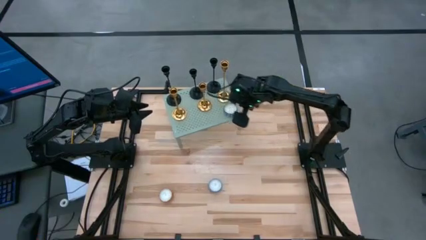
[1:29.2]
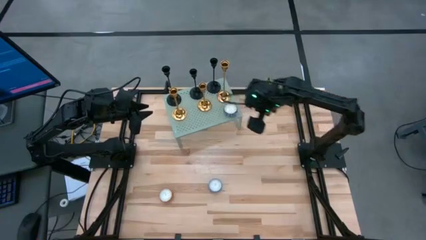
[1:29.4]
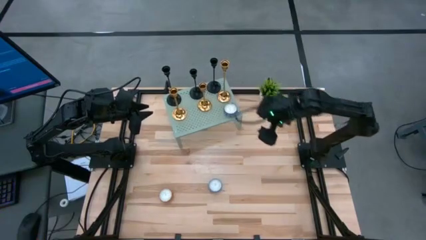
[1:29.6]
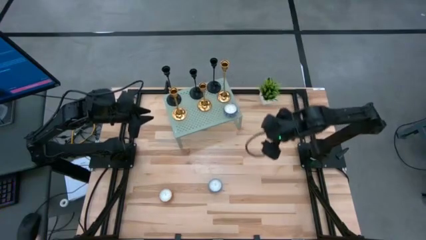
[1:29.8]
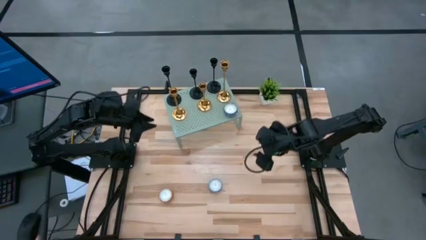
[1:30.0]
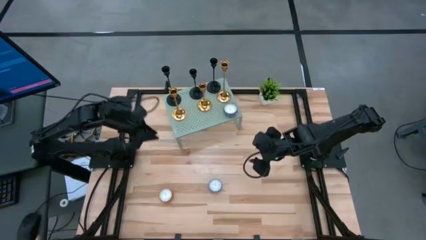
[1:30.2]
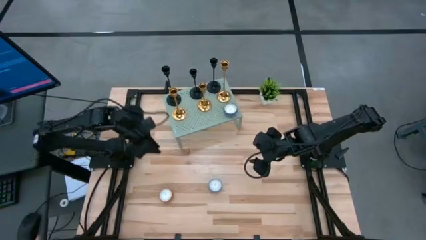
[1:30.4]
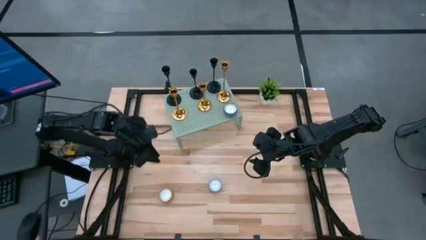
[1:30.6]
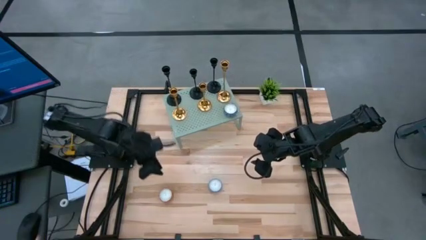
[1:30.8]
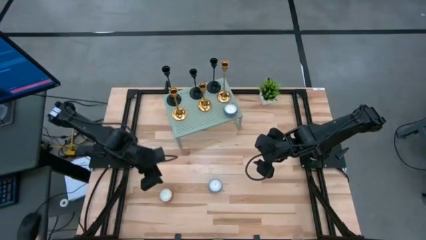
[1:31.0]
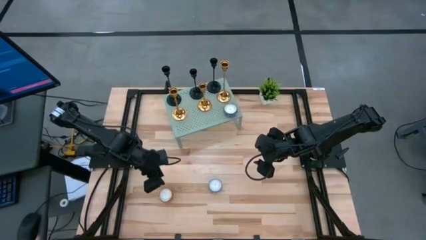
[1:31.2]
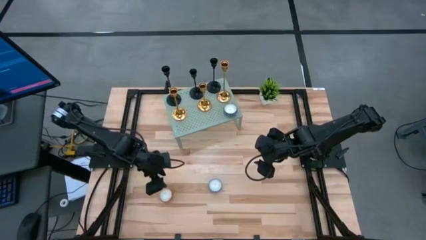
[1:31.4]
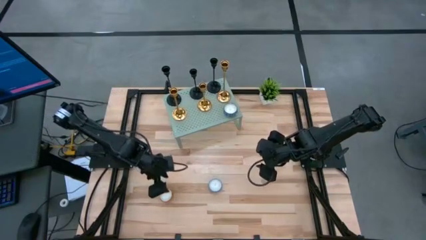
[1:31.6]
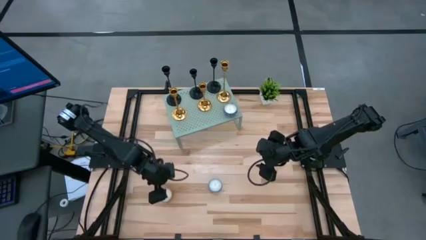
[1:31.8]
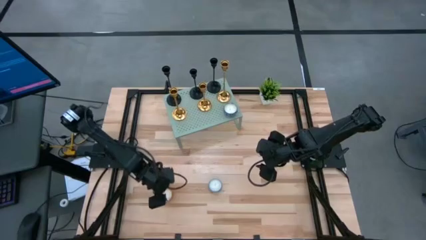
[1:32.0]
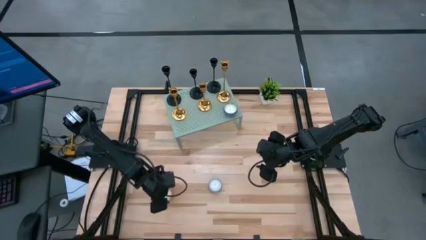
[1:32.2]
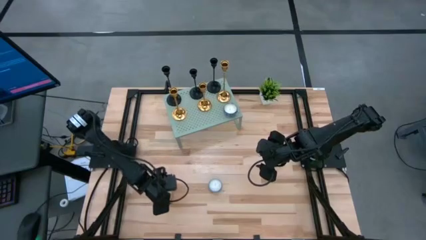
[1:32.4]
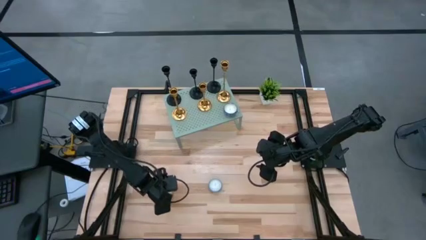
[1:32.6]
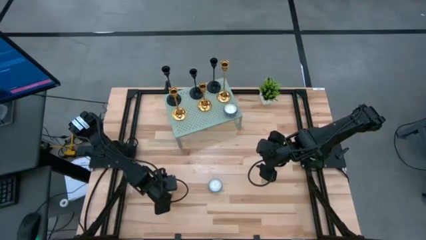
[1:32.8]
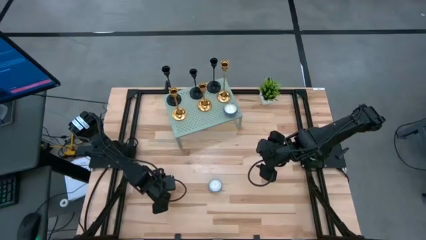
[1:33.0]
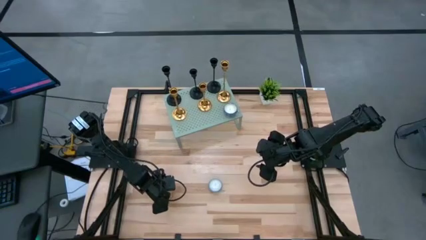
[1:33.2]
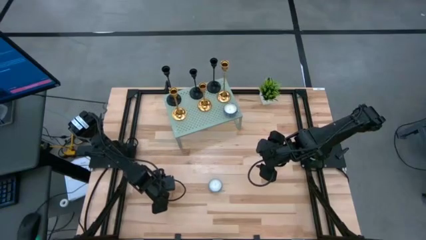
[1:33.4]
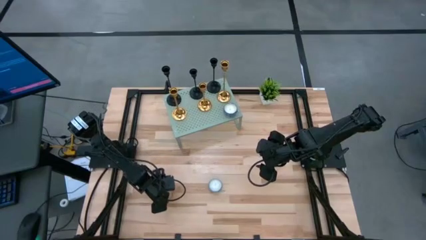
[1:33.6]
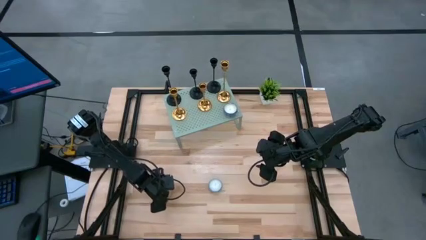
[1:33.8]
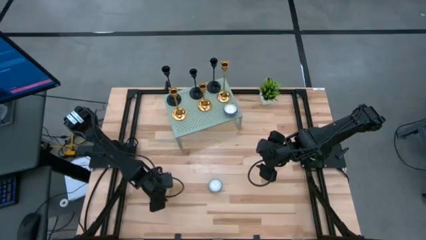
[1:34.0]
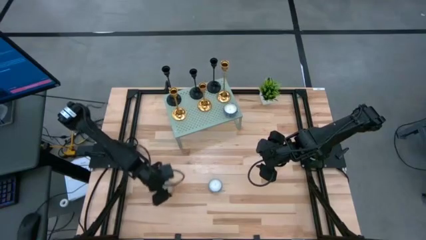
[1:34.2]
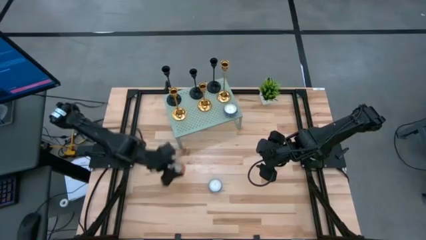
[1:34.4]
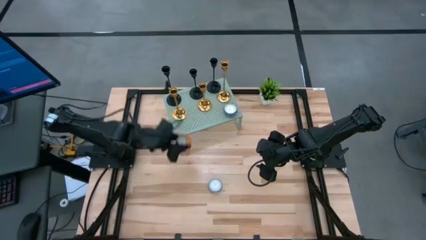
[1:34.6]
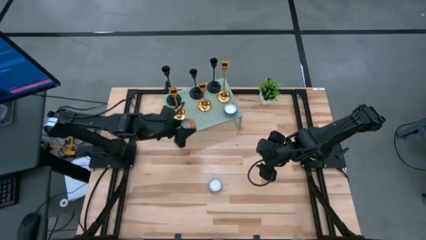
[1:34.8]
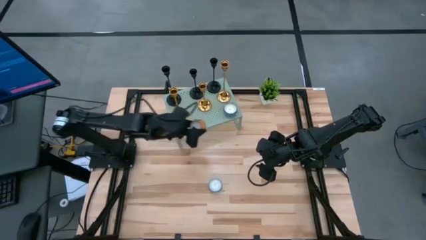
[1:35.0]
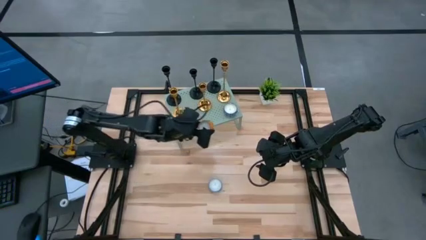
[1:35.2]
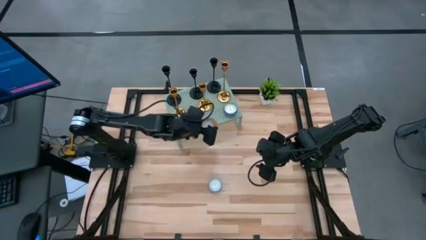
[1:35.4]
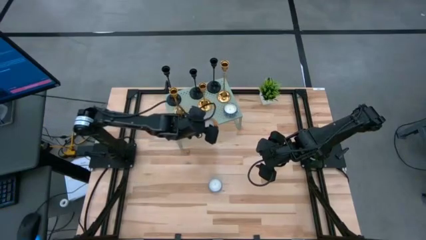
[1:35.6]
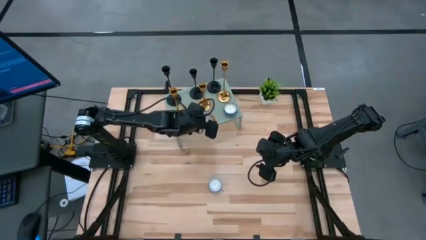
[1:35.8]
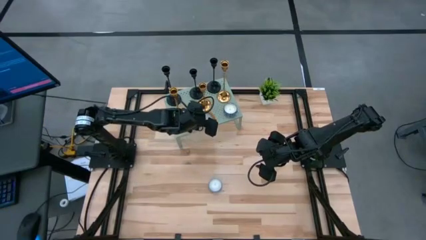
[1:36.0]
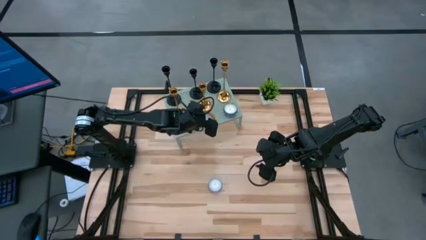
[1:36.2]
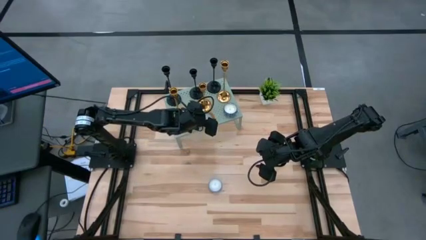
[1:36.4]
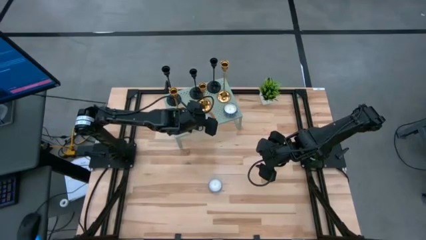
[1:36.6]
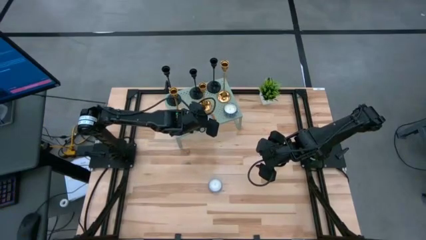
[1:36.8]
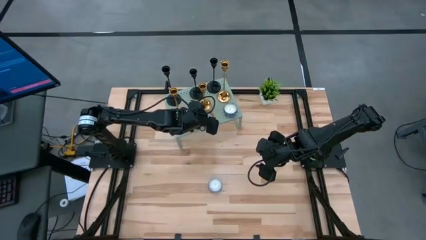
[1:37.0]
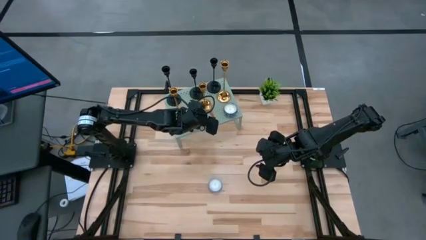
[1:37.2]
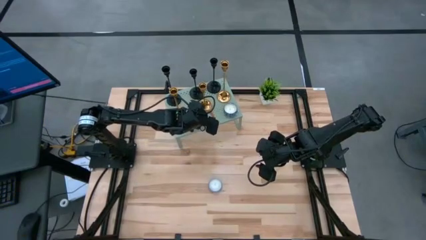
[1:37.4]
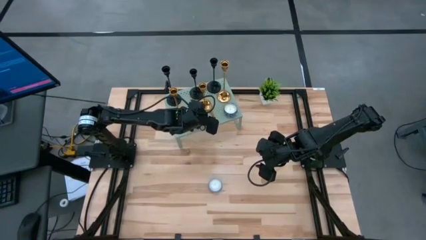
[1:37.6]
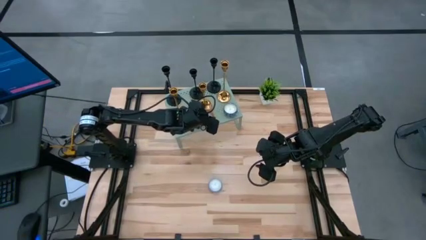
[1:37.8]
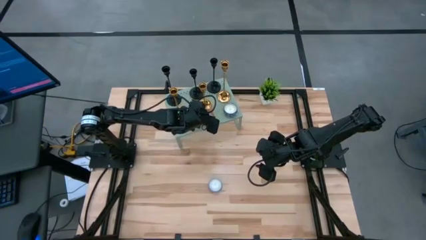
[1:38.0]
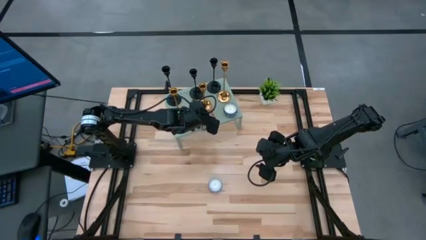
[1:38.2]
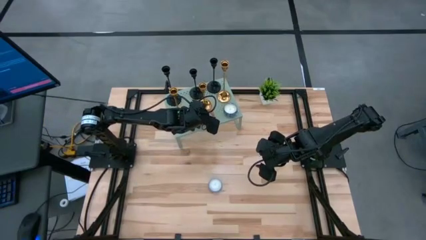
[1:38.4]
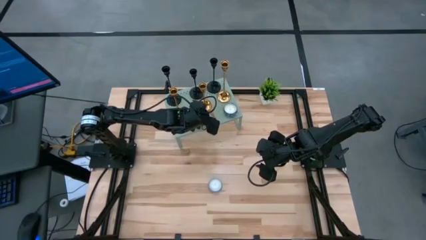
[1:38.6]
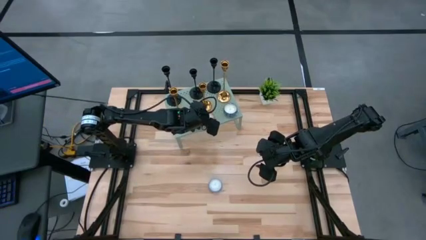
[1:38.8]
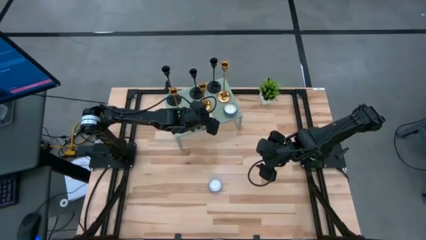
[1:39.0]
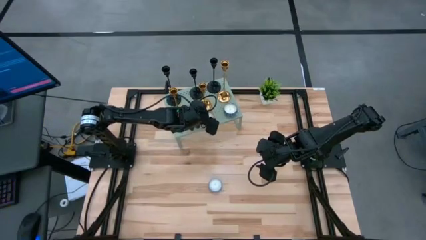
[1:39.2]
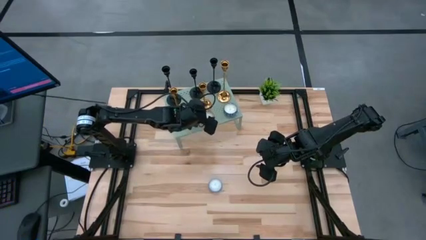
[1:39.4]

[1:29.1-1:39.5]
Task: Pick & Place candle stick holders
Put the orange scented candle on the shelf

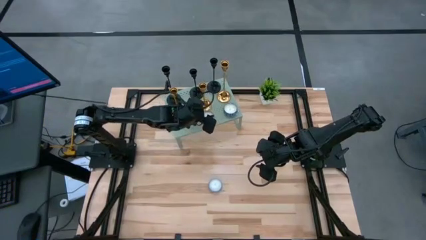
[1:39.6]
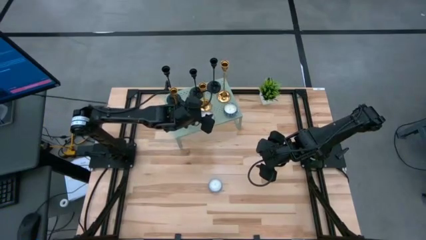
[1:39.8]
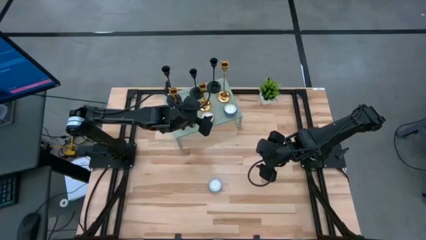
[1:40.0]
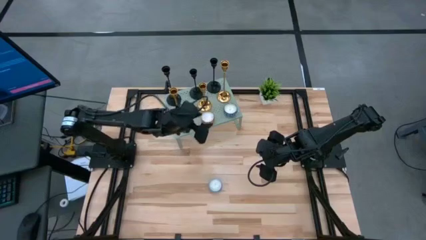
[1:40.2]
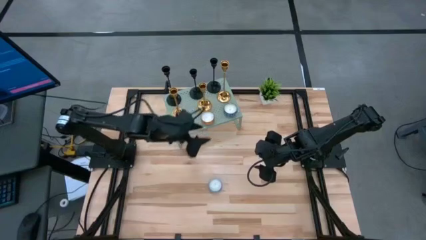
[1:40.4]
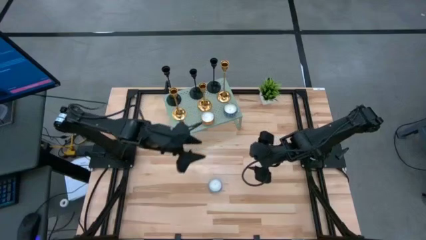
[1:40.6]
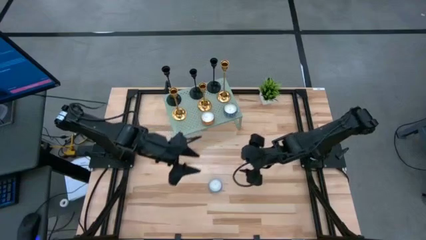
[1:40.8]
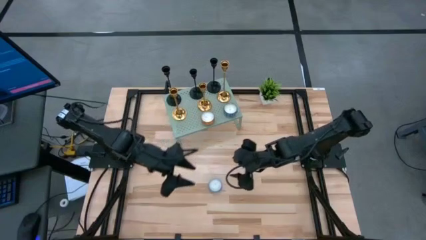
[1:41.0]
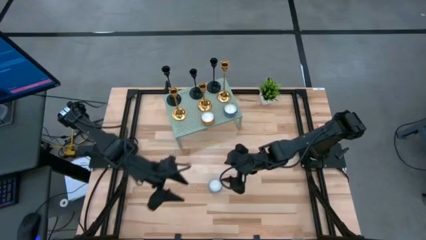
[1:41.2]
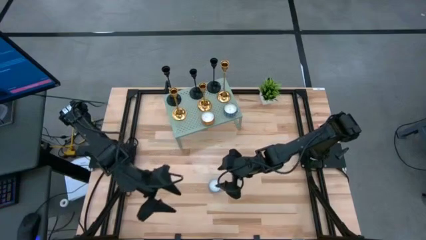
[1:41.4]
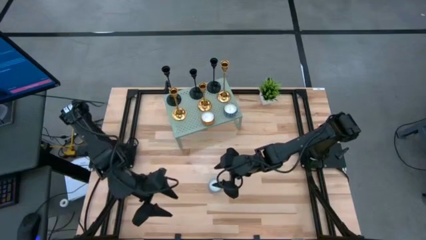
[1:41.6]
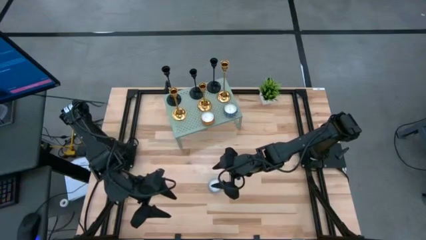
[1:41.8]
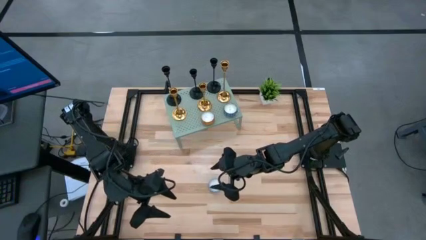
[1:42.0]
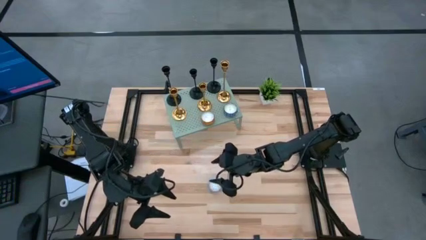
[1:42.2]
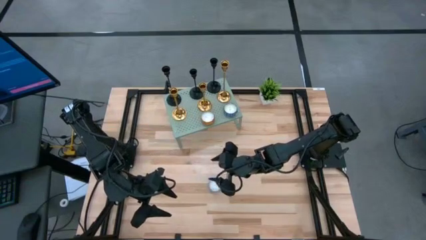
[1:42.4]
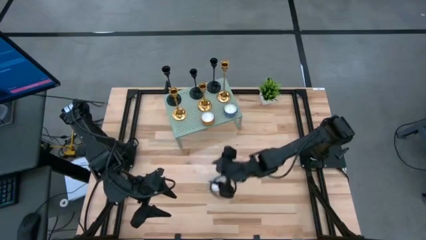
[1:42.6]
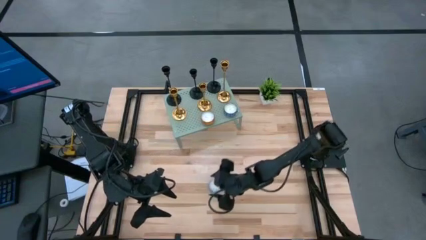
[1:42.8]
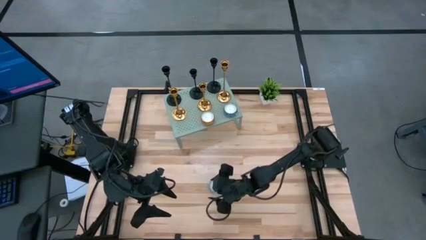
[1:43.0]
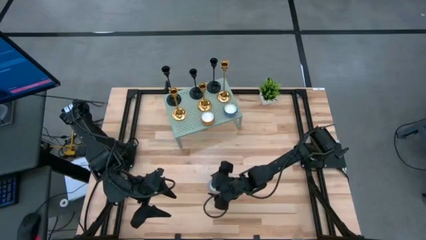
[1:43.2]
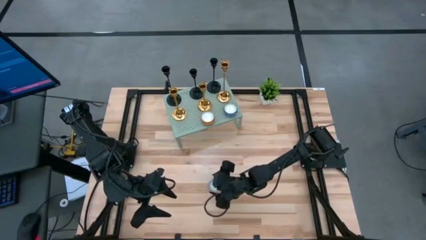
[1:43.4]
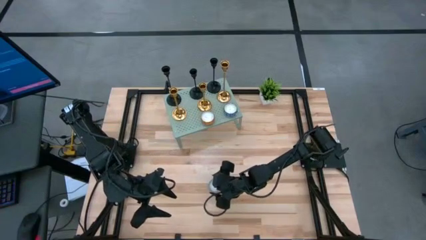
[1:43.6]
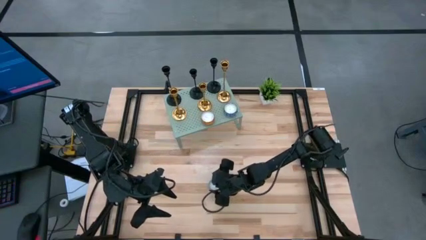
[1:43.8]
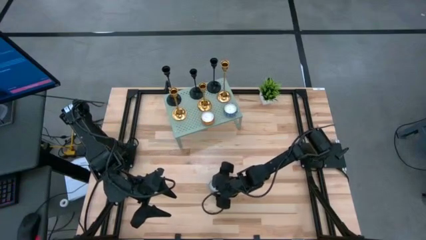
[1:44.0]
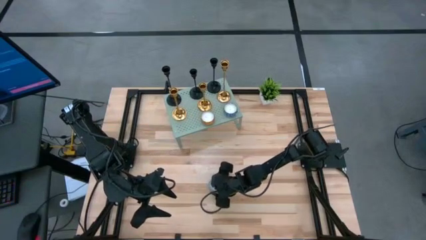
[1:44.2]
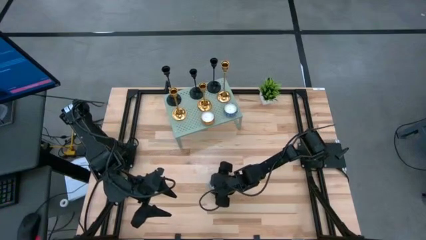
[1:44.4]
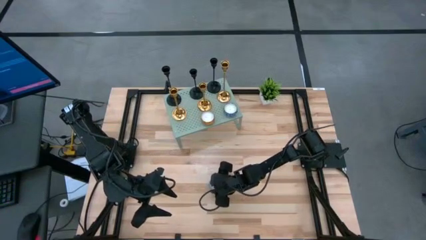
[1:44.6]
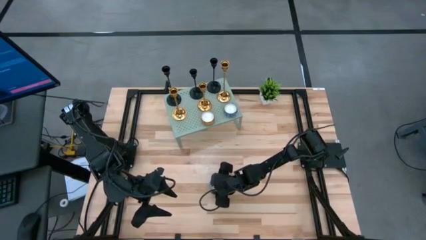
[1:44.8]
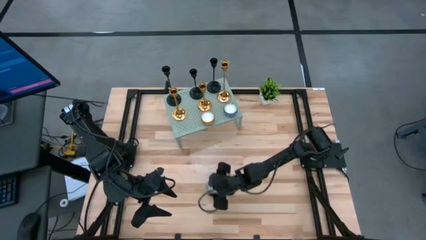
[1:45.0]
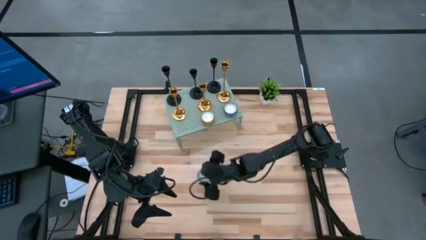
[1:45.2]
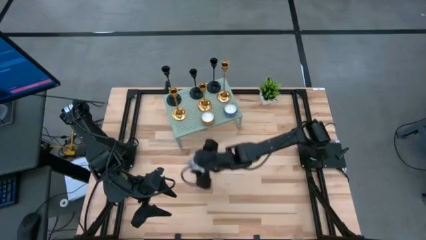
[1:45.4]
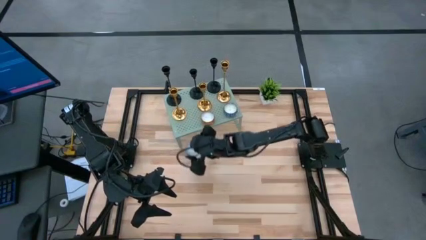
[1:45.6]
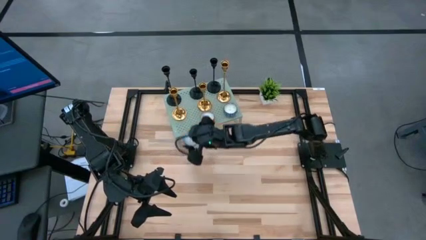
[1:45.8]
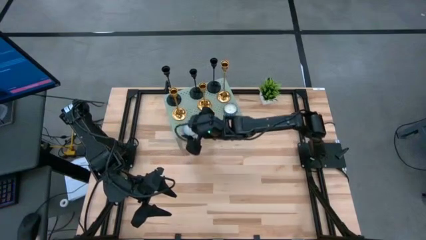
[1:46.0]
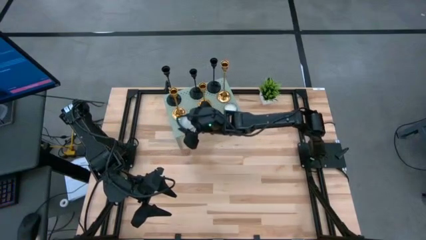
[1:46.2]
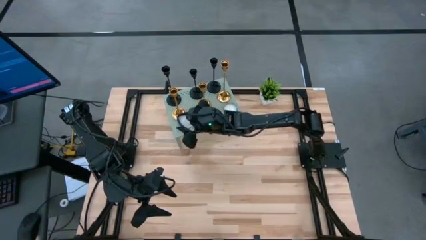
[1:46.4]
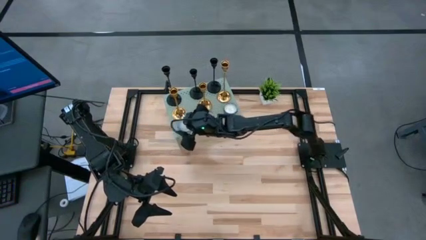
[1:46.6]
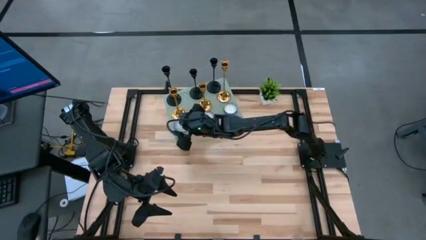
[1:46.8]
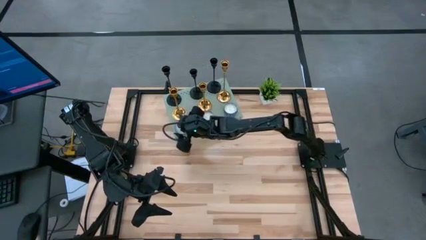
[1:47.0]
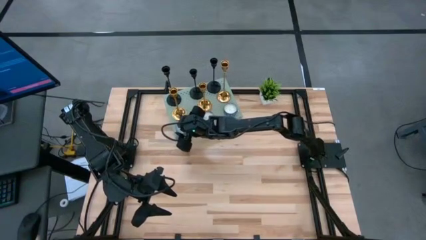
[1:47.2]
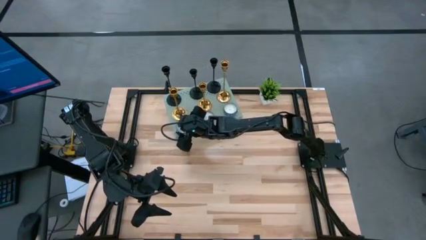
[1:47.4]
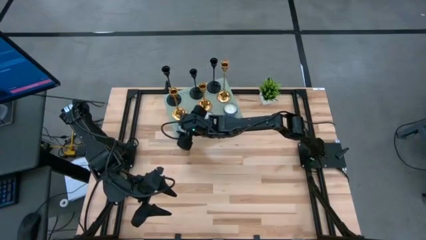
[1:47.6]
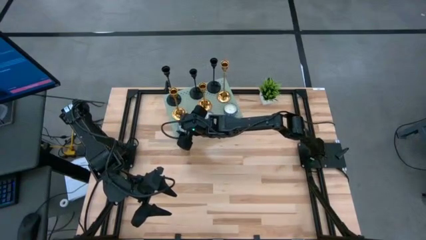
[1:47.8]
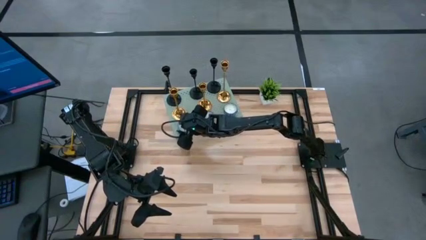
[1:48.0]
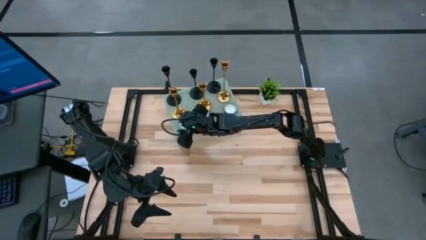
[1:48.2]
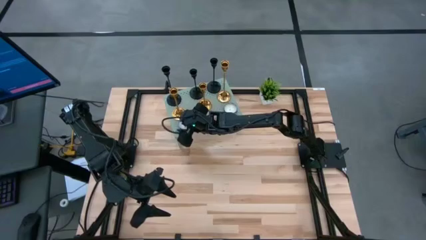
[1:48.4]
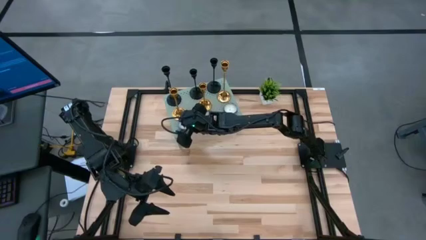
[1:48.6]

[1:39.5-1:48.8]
Put the blue scented candle on the shelf
